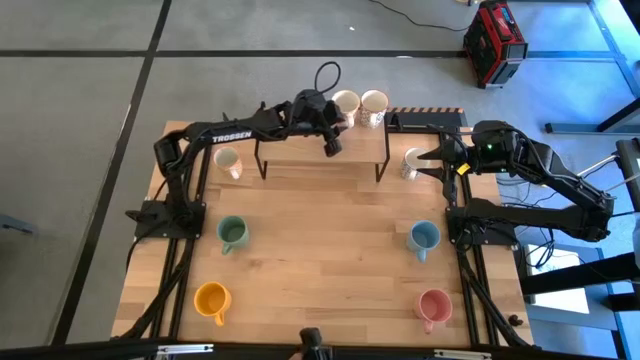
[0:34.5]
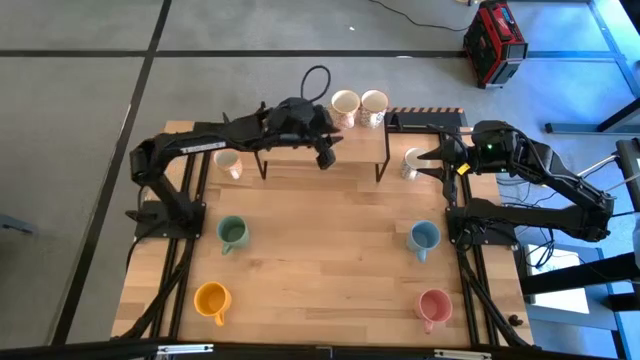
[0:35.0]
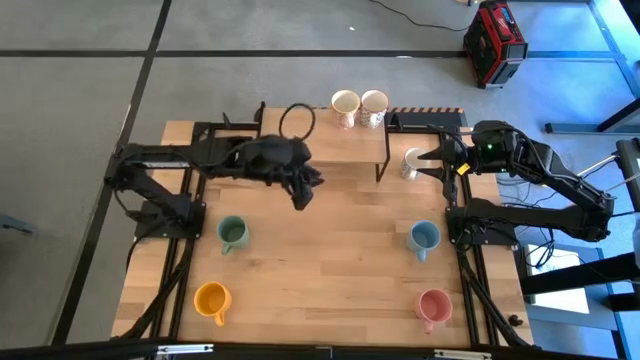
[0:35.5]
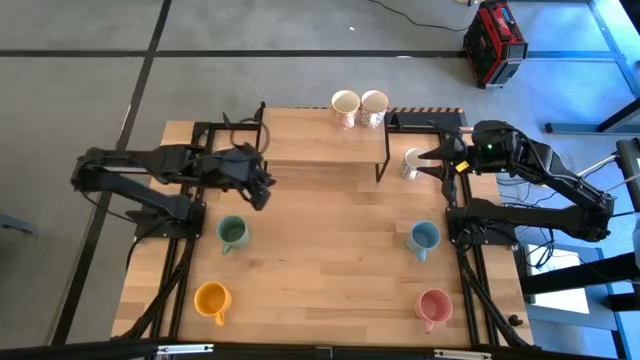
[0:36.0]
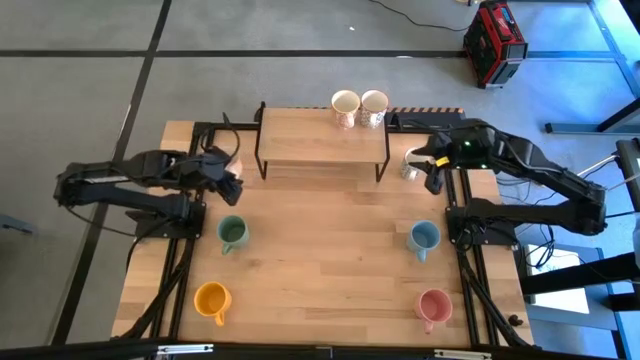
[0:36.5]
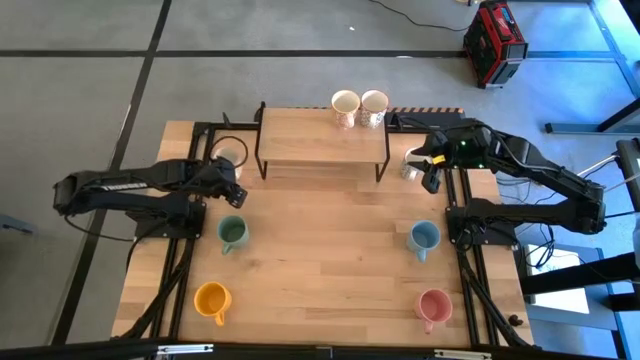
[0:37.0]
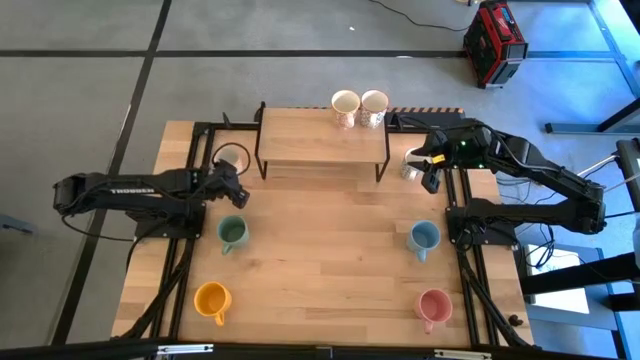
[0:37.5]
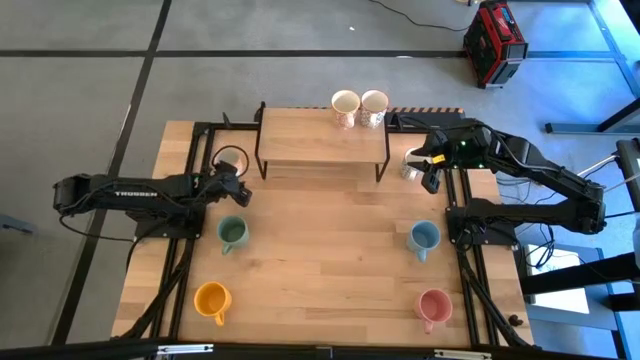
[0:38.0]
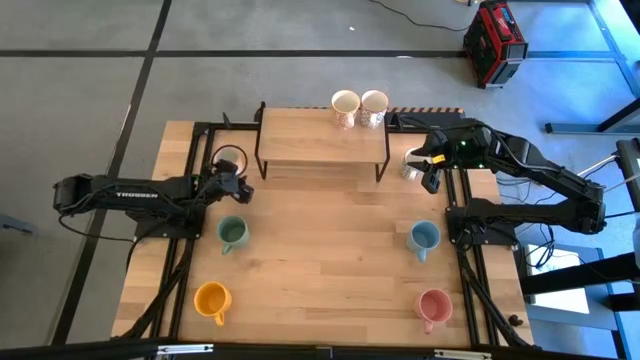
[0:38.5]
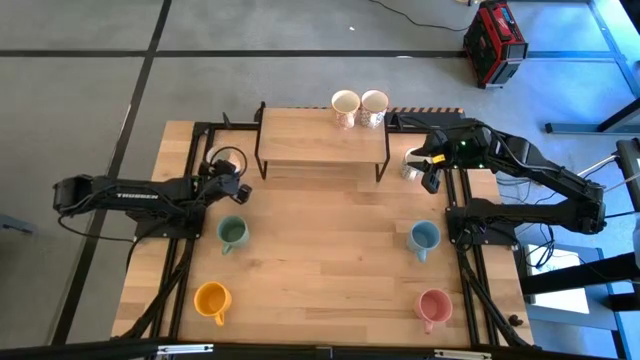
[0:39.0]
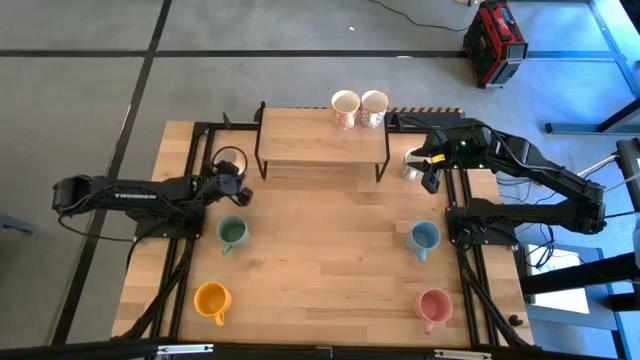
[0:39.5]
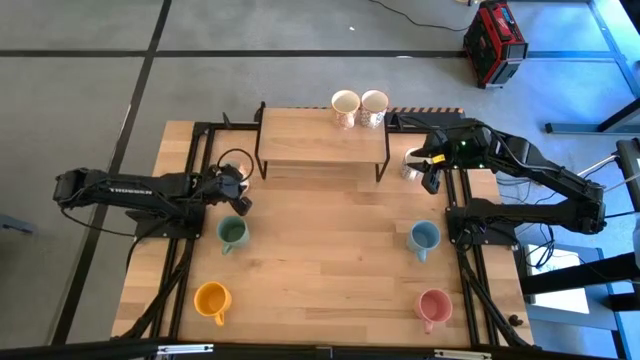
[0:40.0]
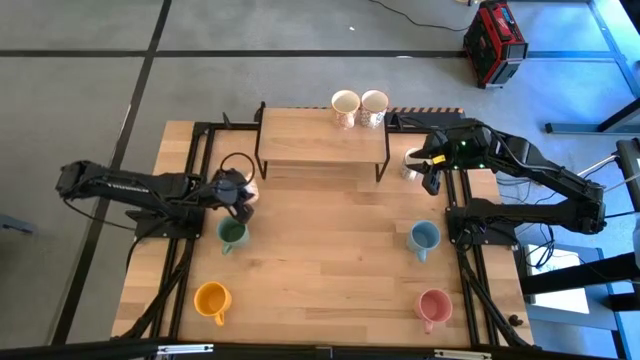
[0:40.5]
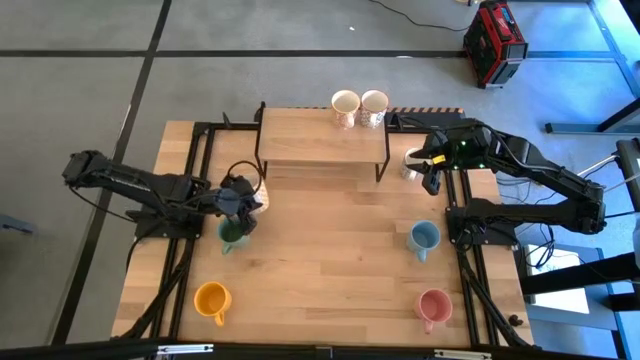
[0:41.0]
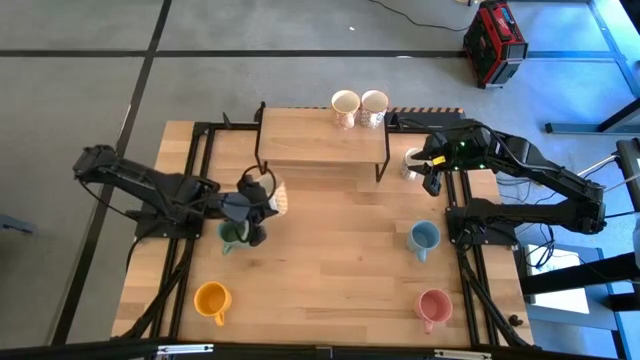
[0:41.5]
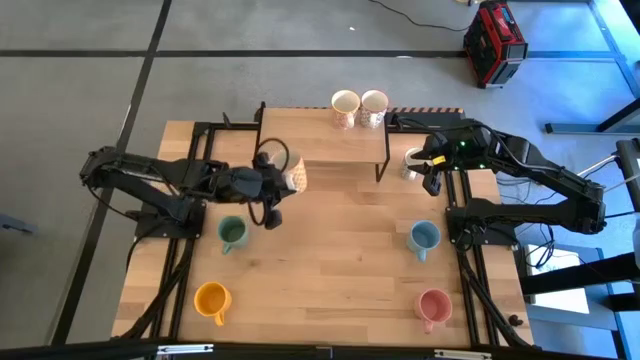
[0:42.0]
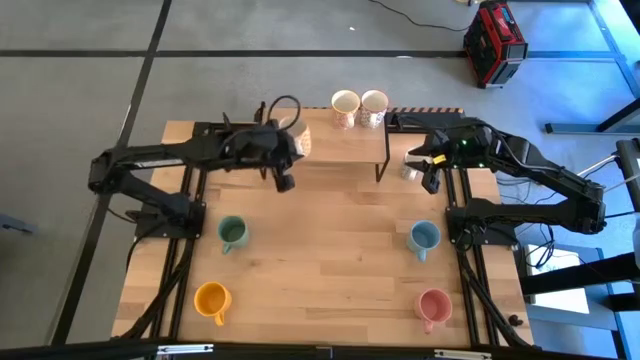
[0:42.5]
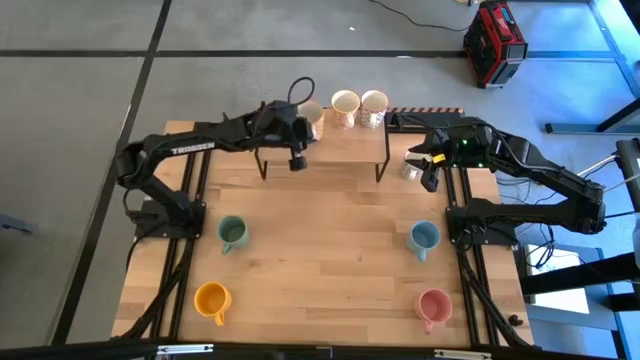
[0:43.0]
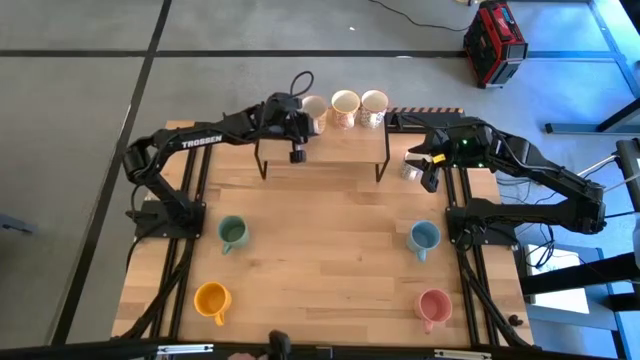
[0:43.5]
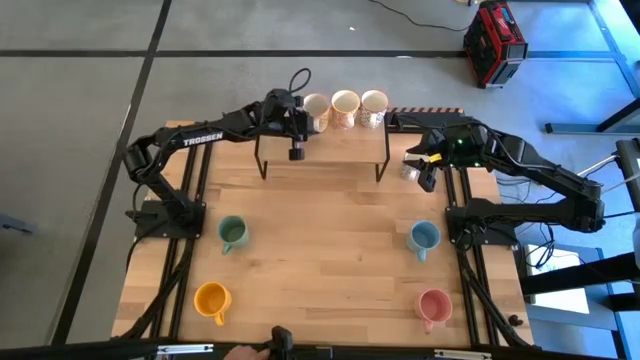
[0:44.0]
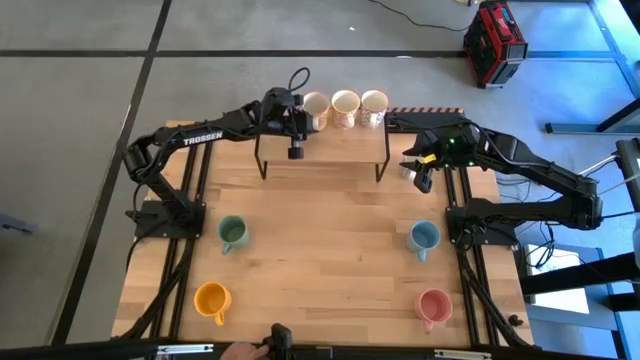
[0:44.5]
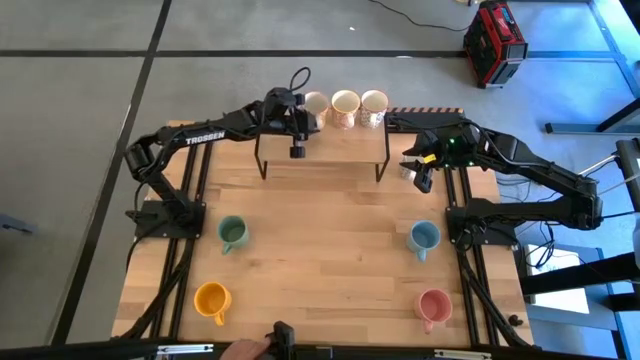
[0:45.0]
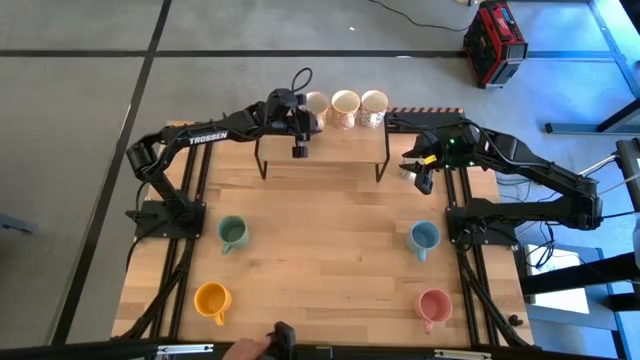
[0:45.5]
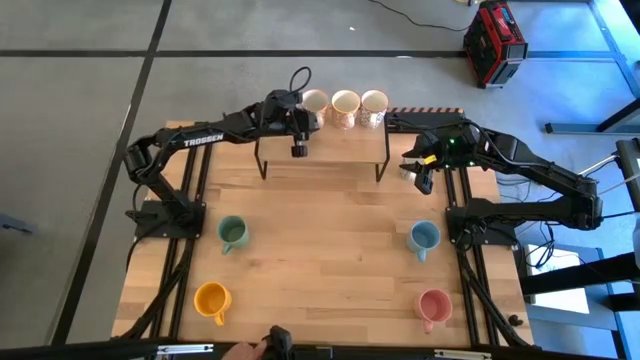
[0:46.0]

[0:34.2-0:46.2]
Task: Place coffee mugs
Put the yellow patterned mug on the shelf

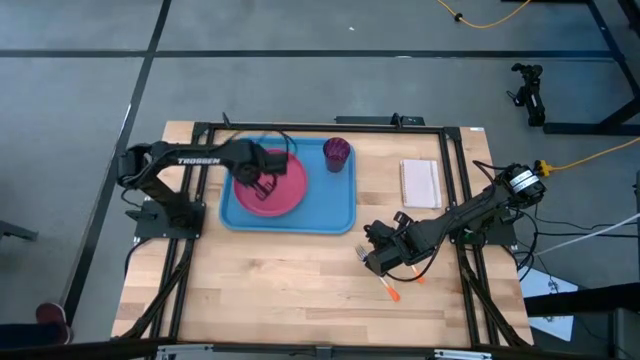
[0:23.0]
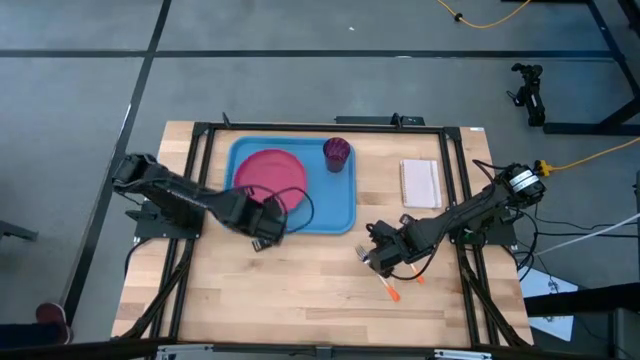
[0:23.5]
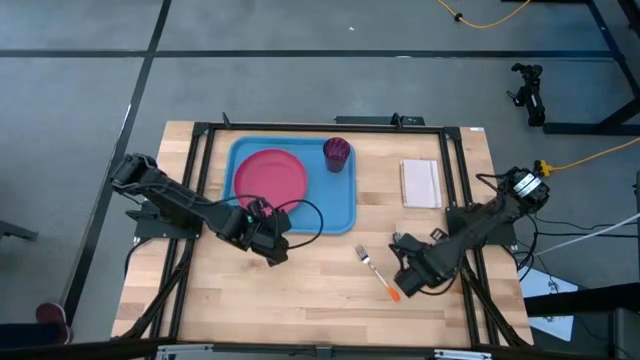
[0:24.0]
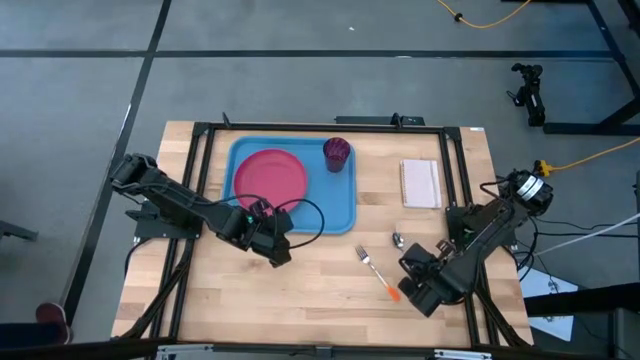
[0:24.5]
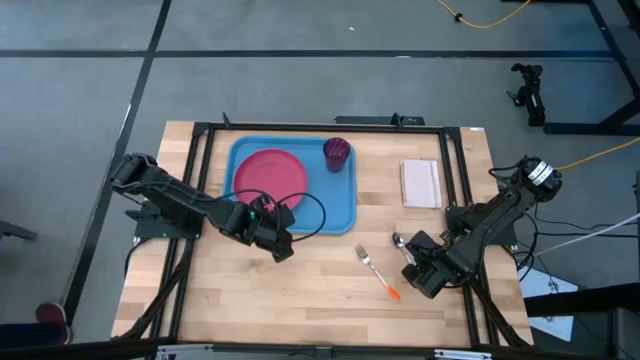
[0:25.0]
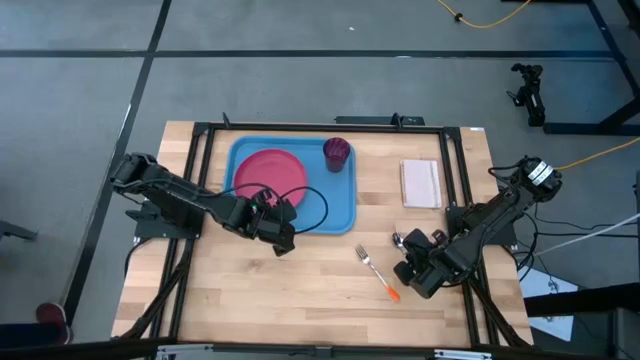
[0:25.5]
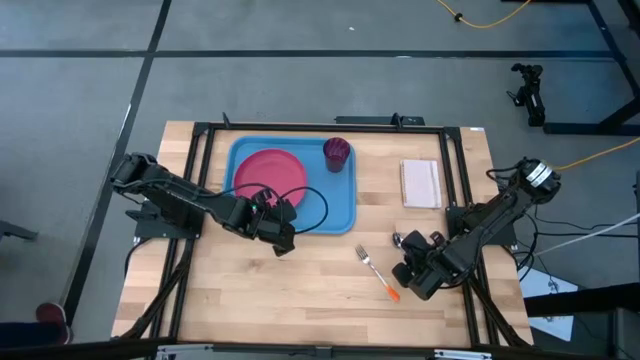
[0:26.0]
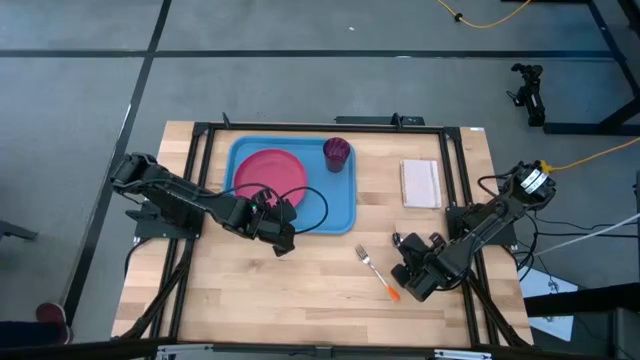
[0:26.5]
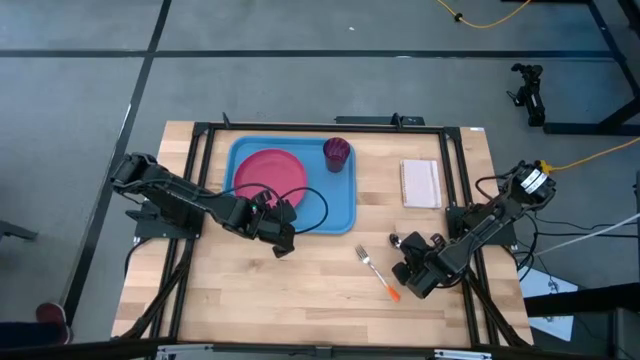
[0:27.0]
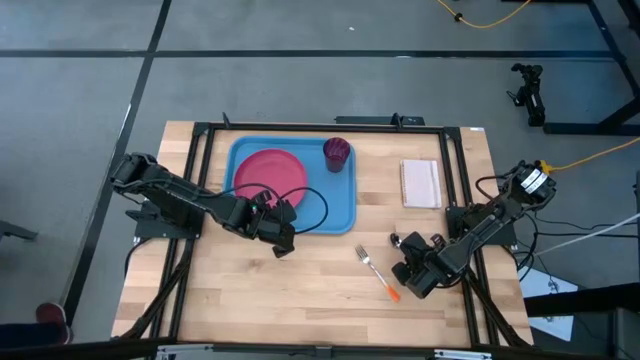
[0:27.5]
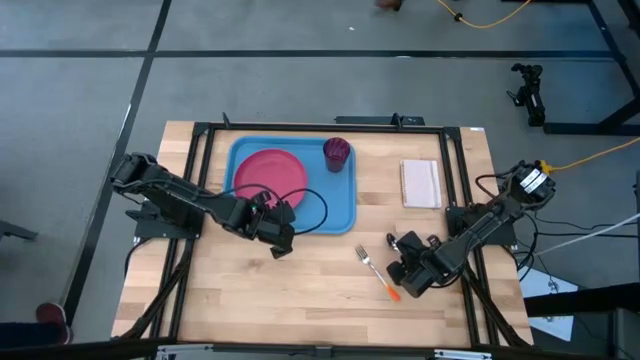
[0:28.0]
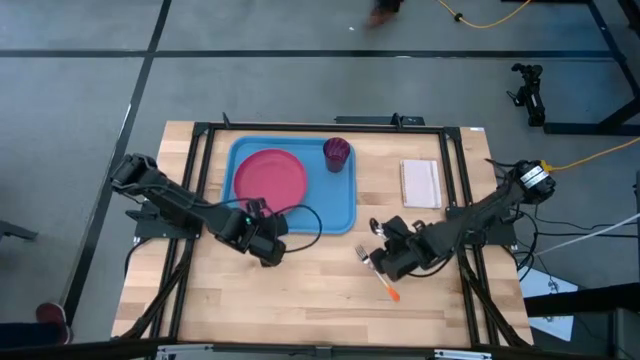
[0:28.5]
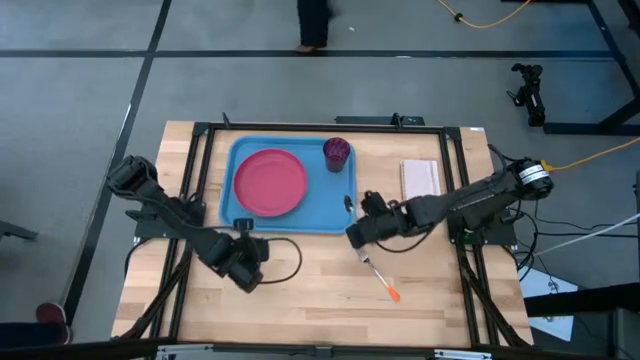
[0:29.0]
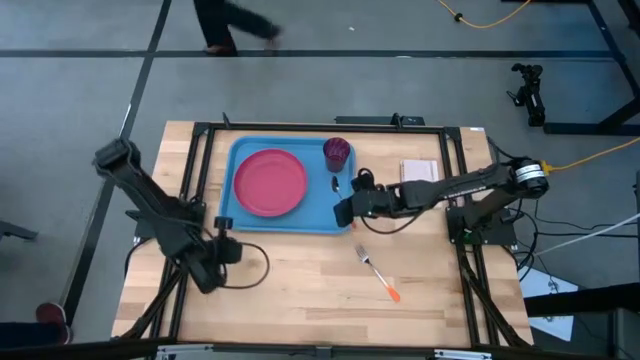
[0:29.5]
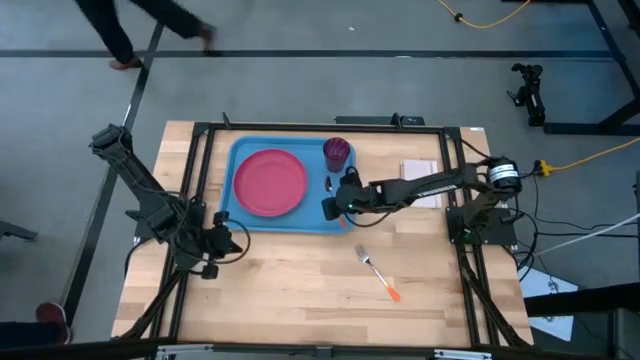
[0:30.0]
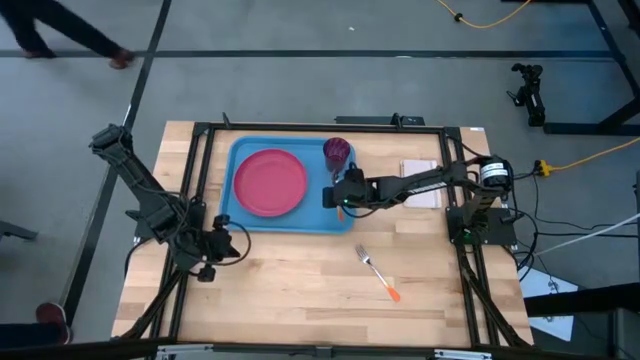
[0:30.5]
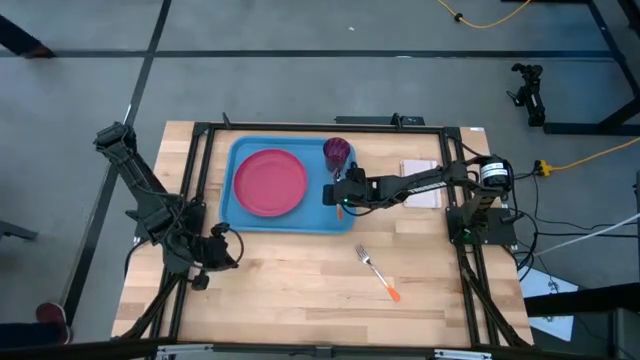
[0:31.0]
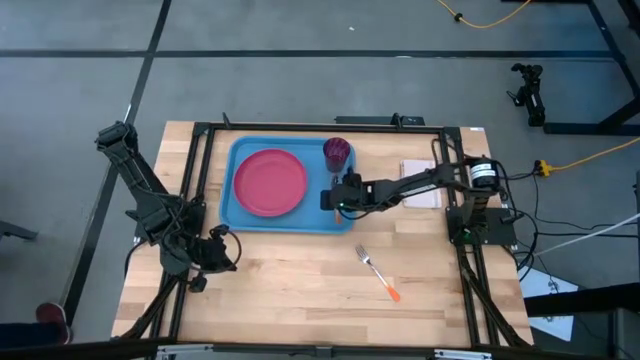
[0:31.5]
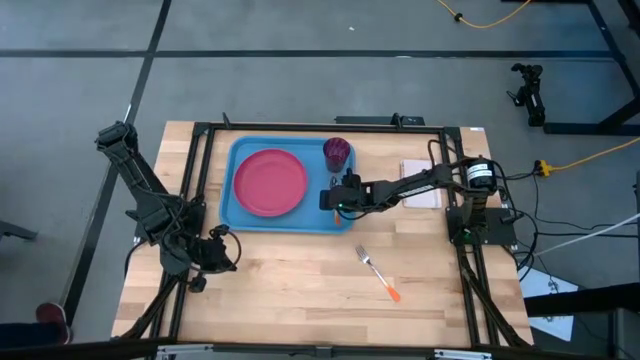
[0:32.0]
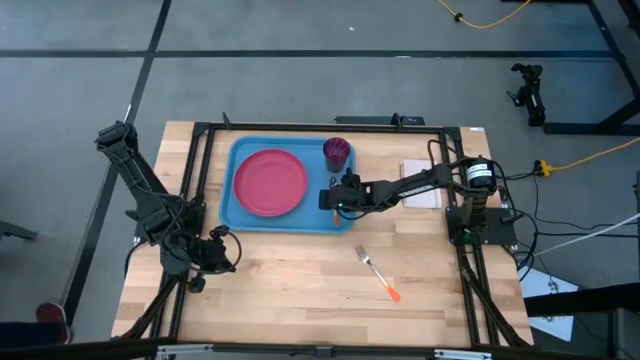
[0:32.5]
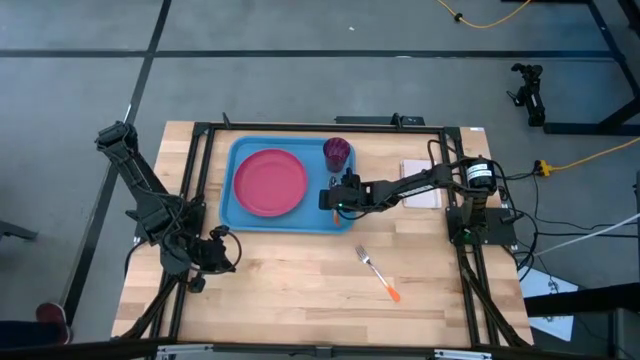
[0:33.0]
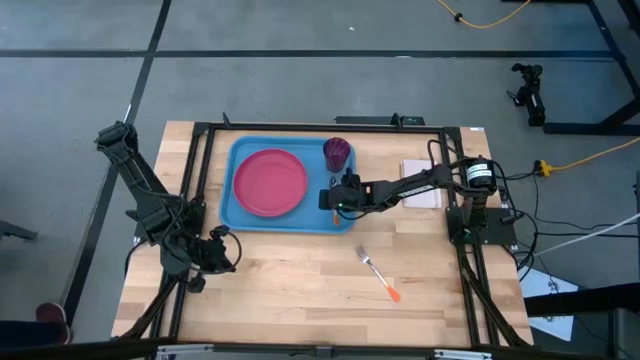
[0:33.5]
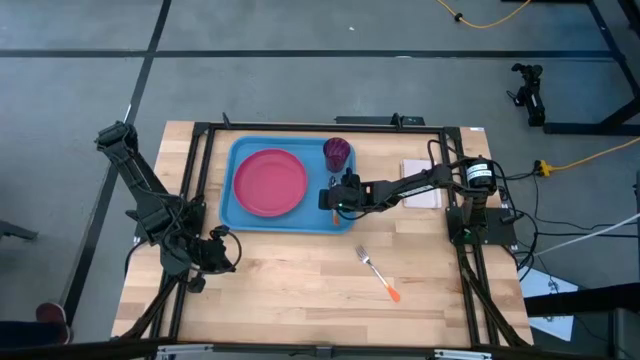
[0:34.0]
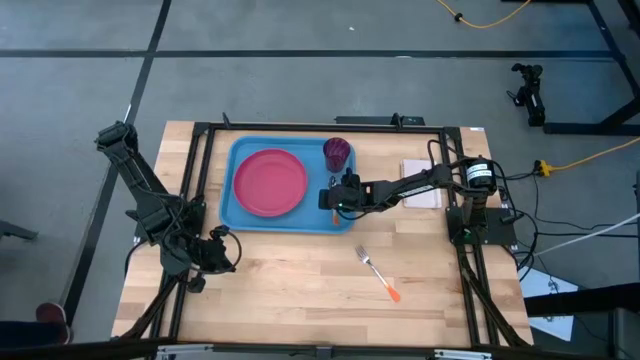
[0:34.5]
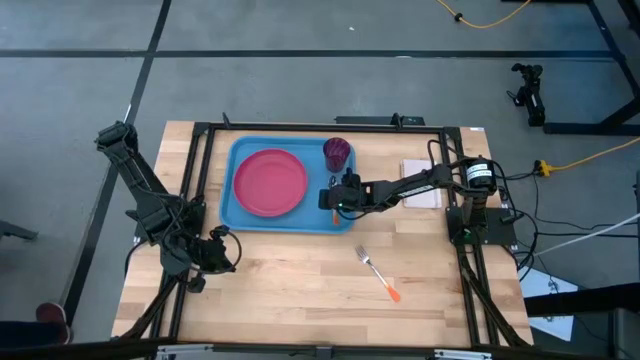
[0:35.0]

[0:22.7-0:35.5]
Task: Pick and place plate/cup/fork/spoon on tray
Put the orange spoon on the blue serving tray to the right side of the pink plate
